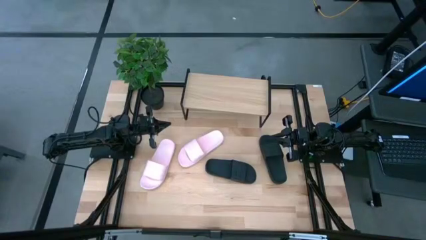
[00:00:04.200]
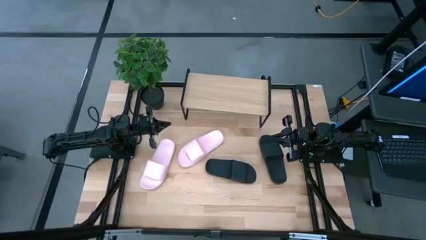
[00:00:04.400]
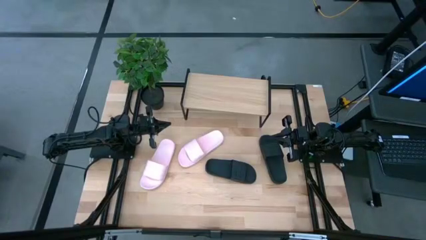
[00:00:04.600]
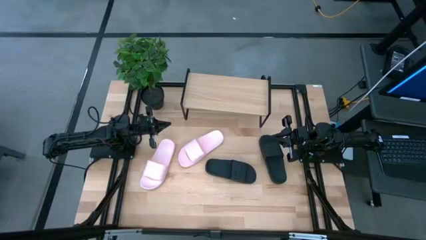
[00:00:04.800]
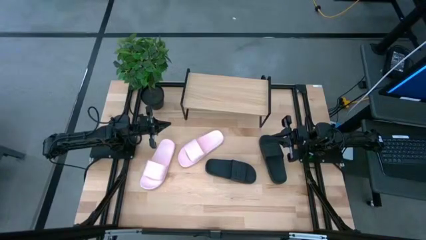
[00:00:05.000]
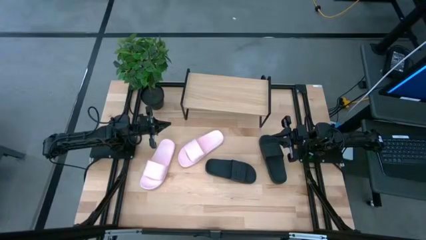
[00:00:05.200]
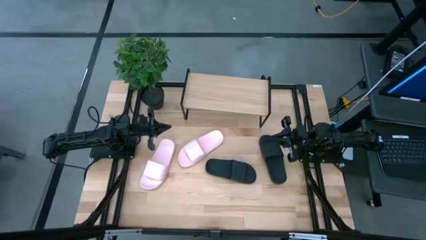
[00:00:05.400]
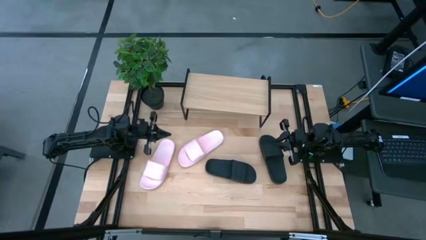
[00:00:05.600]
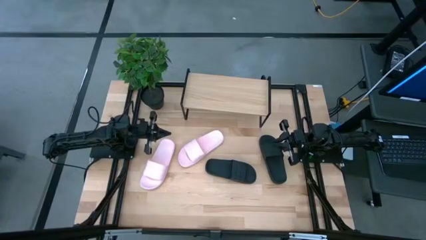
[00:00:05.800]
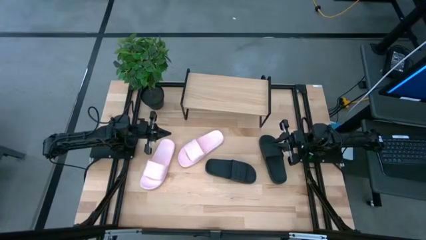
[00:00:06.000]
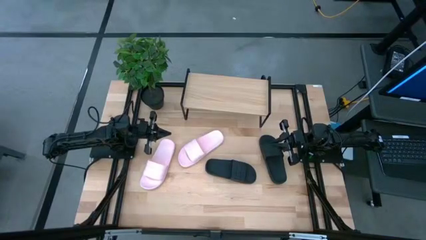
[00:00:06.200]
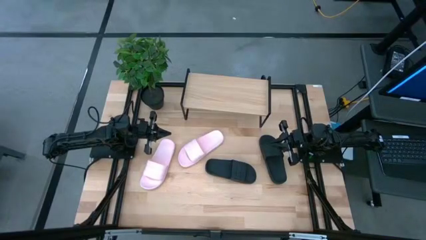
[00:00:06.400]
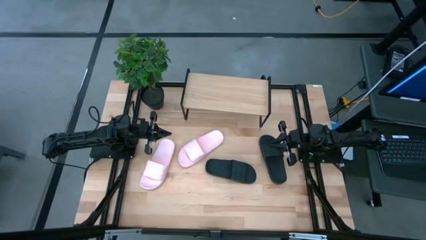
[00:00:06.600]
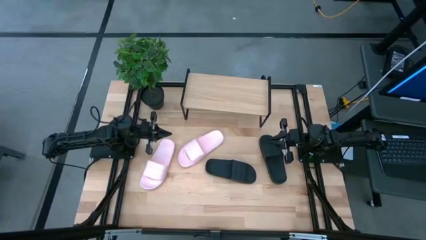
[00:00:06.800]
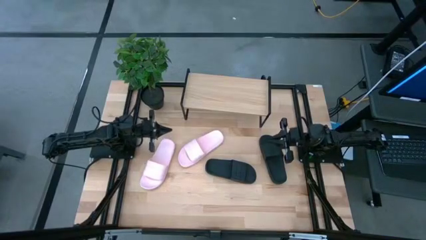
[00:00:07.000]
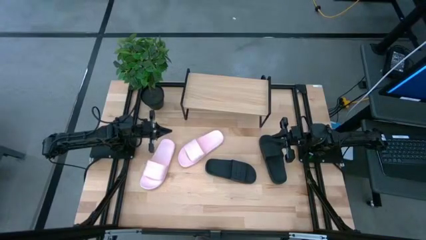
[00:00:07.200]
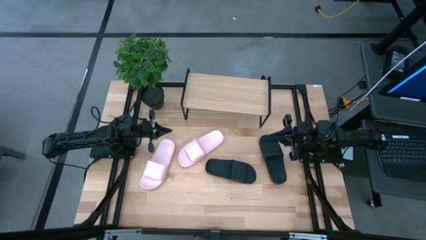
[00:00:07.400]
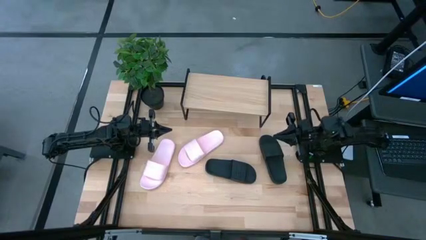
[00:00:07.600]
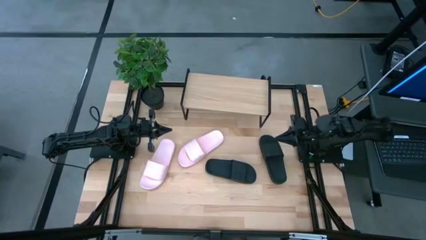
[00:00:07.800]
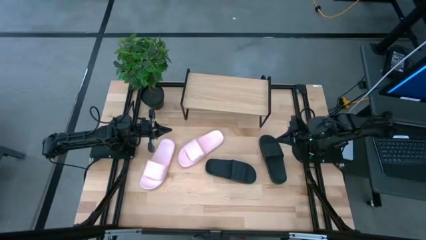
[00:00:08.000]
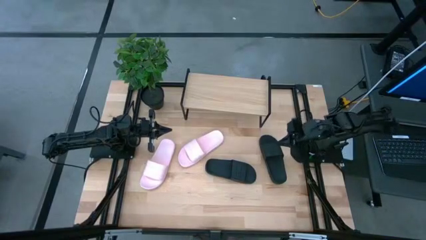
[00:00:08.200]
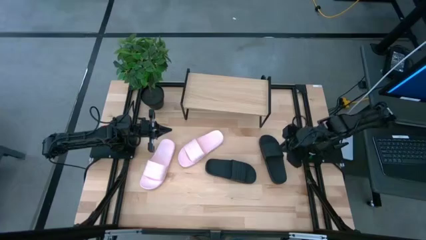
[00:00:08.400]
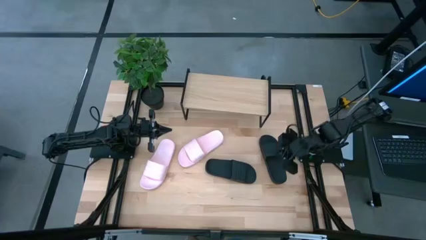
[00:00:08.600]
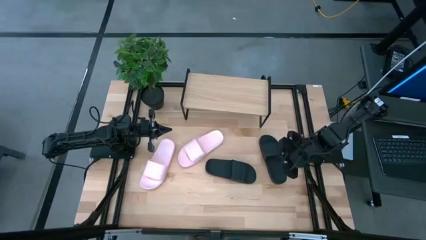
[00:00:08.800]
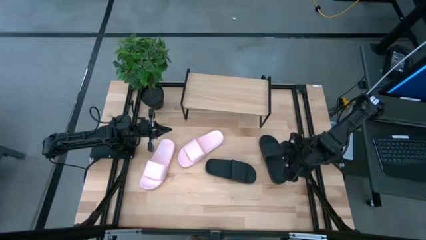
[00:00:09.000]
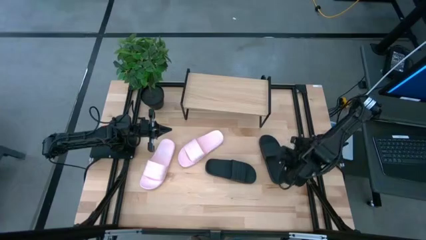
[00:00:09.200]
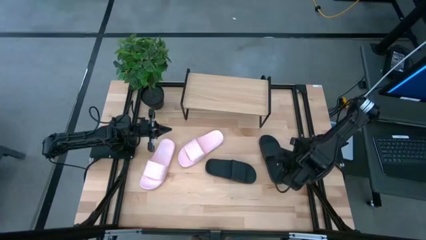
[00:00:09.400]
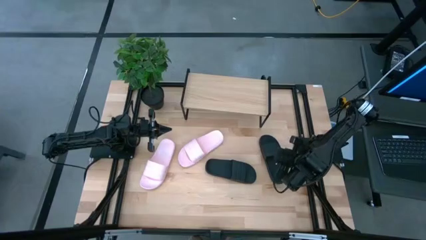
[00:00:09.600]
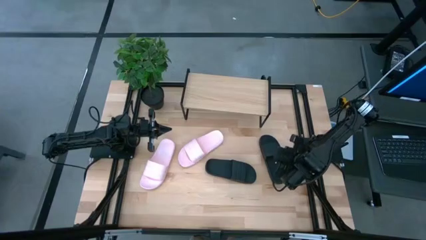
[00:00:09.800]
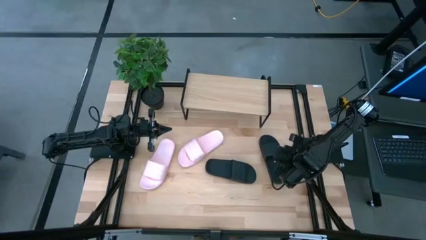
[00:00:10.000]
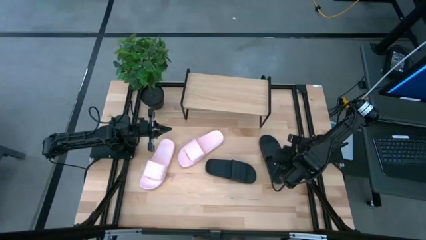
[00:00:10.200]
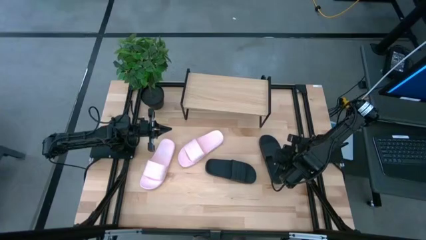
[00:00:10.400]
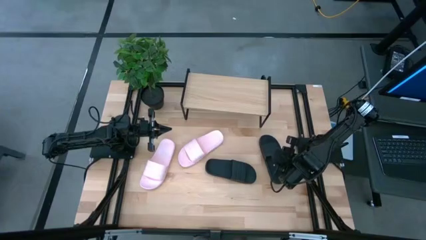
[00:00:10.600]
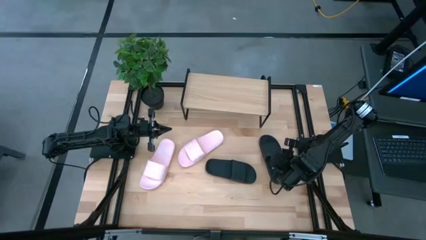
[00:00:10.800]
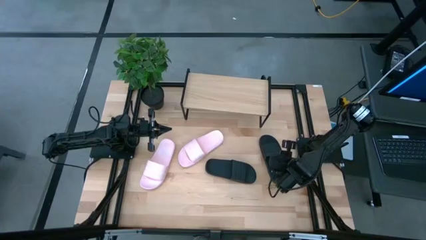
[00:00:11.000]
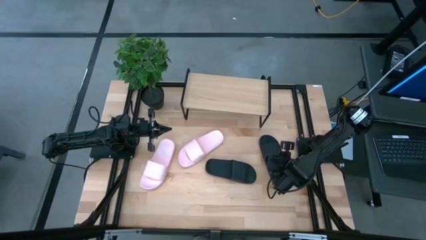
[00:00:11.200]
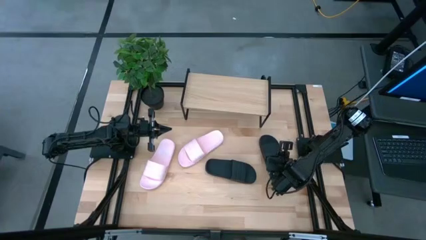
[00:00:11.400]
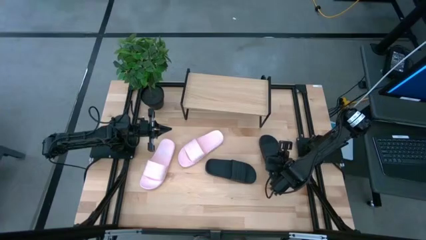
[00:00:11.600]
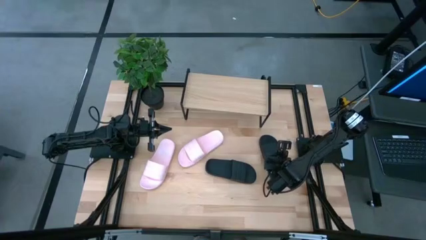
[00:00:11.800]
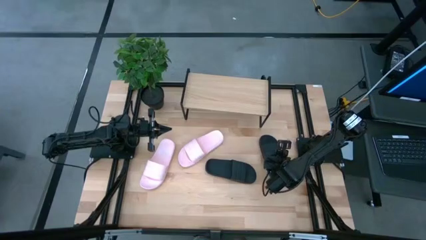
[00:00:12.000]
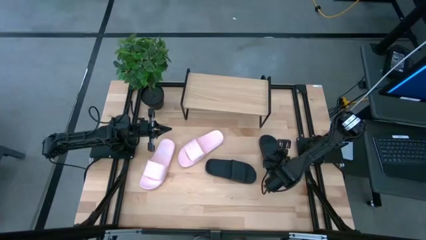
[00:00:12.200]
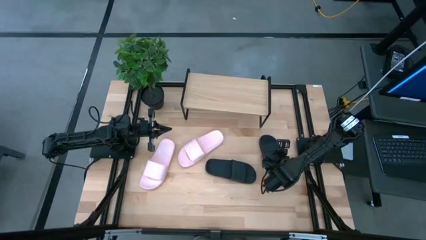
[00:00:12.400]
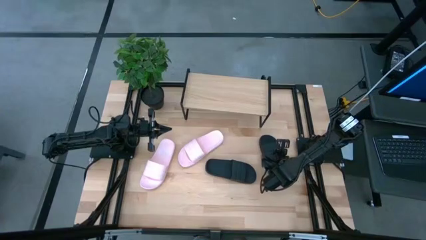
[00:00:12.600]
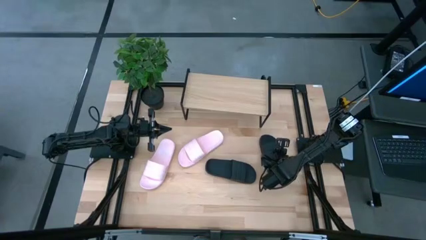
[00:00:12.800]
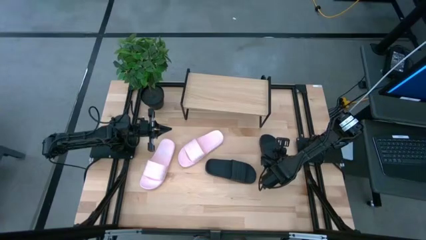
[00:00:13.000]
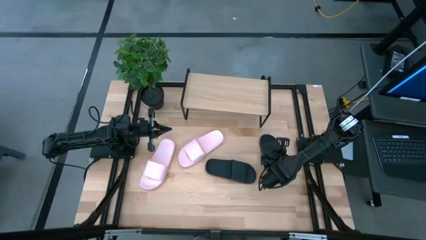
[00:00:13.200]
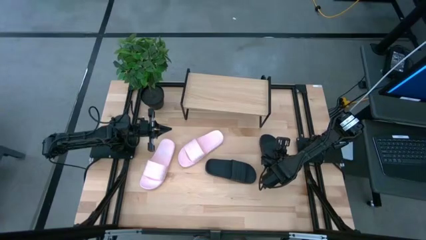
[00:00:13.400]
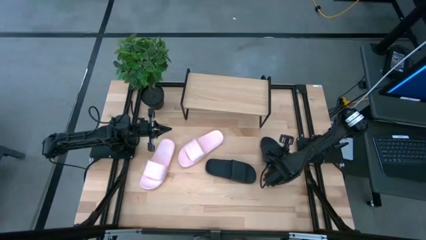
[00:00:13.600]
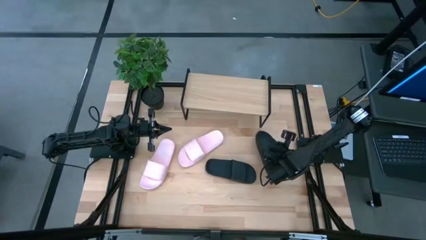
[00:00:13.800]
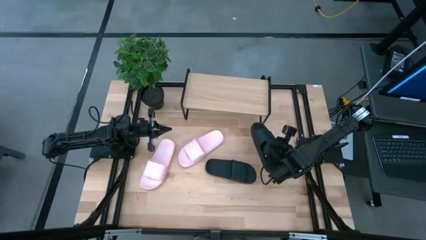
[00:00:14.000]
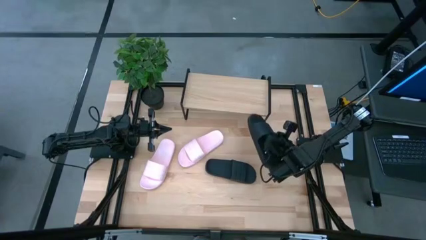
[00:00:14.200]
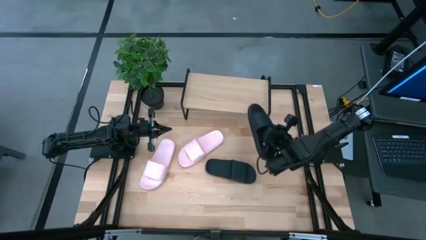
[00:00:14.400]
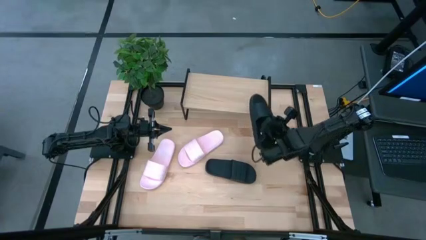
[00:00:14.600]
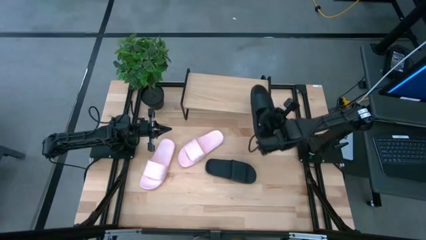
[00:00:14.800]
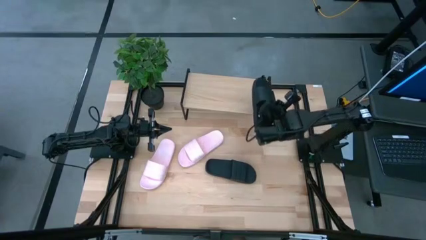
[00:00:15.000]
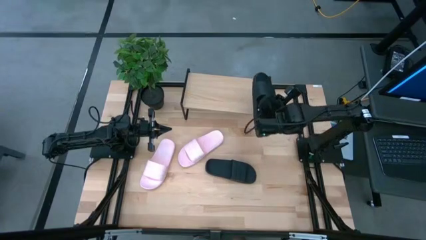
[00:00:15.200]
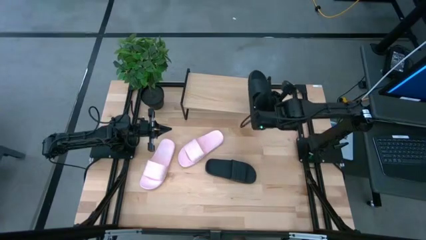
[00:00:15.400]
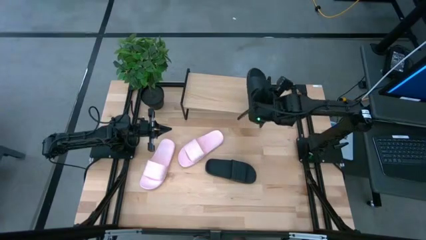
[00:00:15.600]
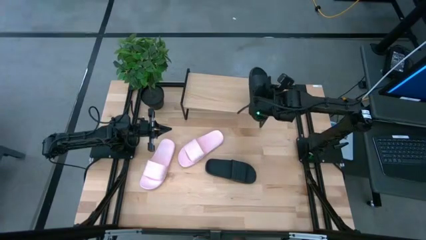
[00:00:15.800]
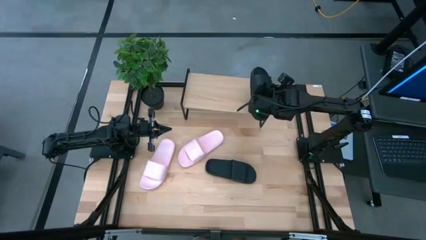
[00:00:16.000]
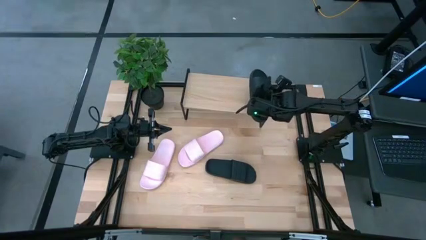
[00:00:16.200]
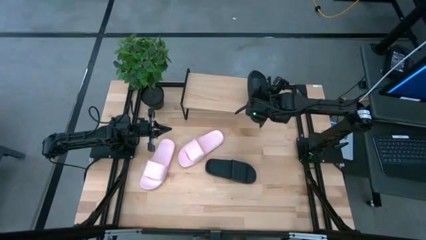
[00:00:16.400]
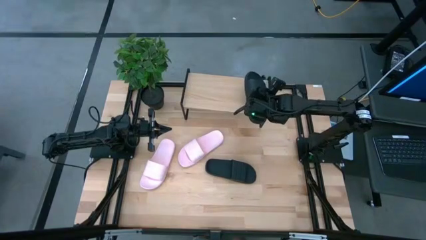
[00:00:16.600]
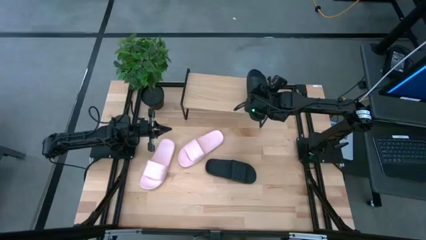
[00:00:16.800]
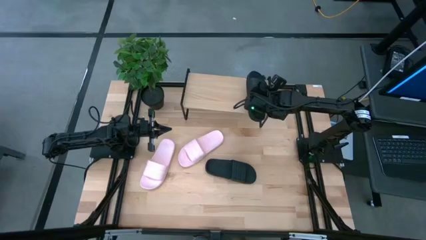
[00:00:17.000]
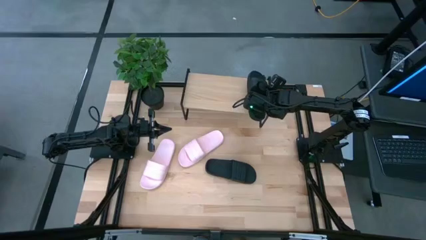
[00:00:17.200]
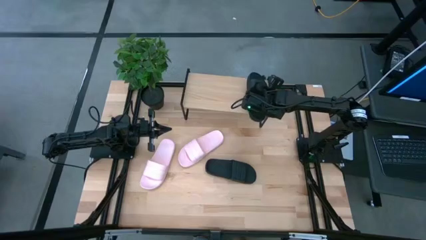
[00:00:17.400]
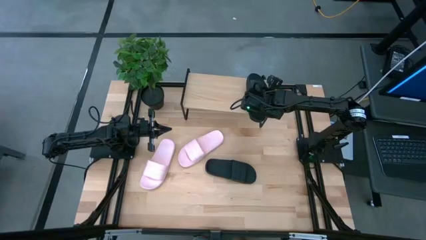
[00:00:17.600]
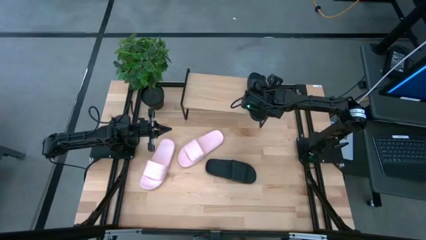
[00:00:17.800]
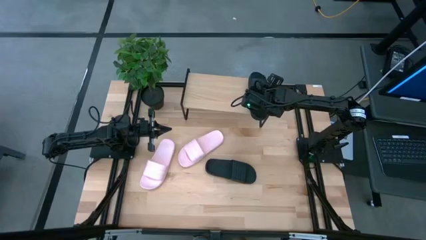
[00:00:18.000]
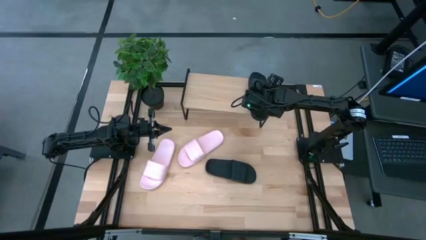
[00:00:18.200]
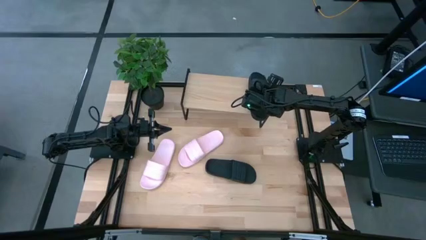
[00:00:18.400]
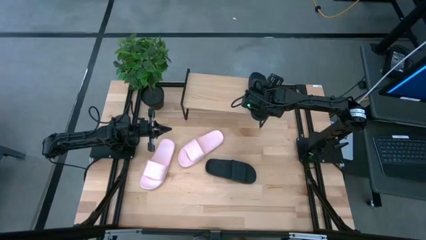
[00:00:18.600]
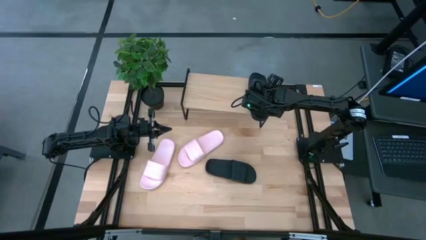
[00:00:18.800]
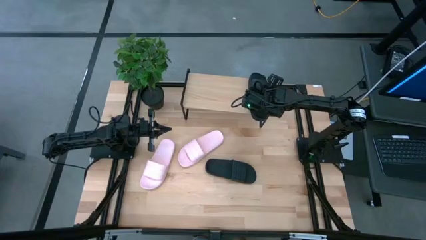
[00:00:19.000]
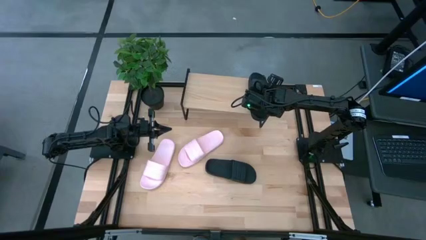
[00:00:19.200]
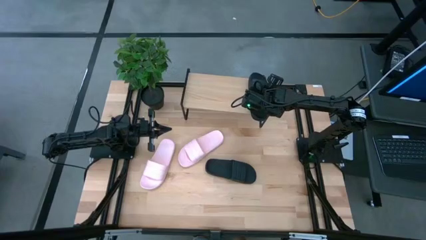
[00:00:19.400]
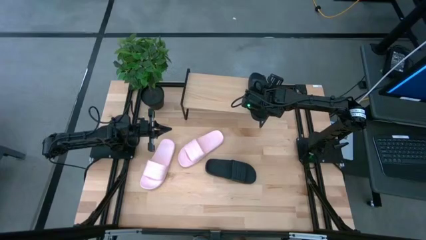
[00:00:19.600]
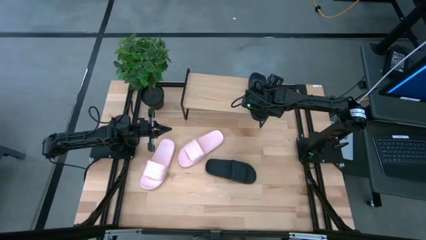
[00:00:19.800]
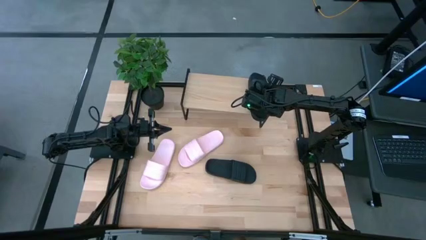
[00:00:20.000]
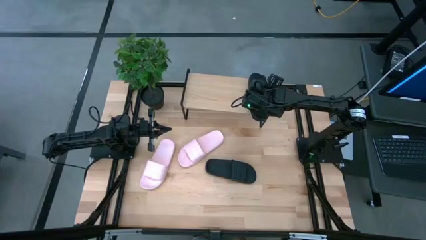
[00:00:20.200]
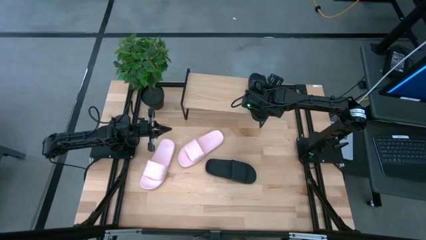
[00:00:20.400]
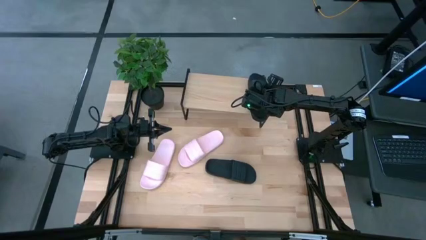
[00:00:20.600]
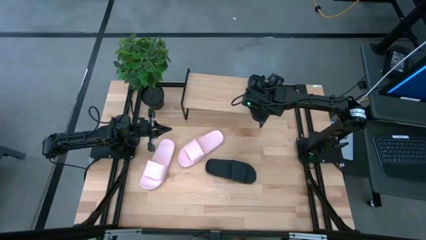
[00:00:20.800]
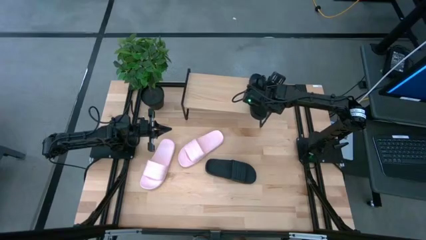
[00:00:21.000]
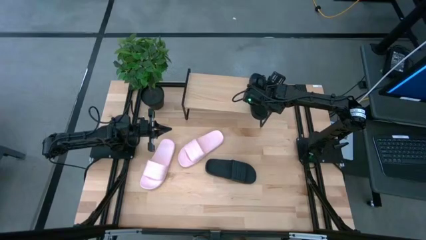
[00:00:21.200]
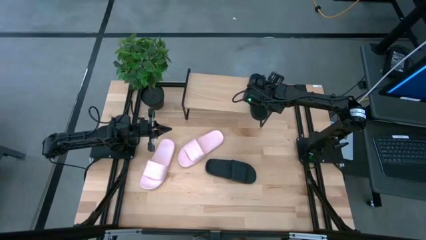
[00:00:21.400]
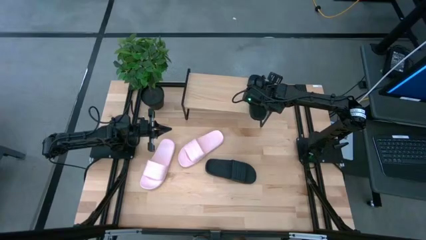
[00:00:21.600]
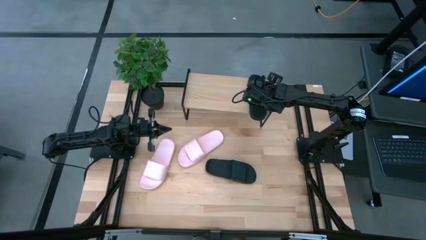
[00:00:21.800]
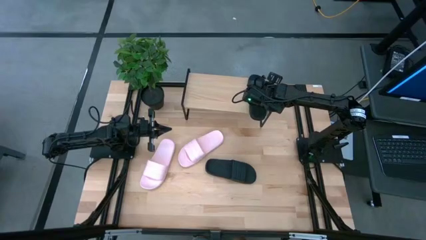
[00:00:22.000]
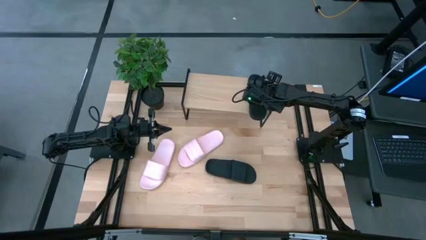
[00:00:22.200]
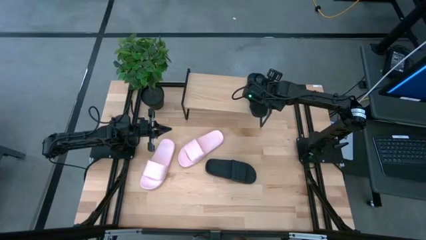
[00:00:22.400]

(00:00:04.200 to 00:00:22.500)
Task: Pick and place slides into the shelf
Put the right black slide on the shelf
